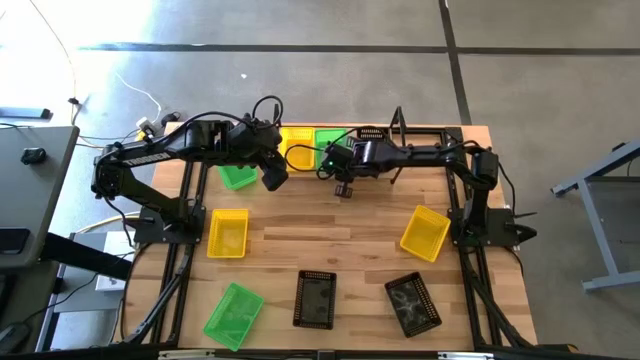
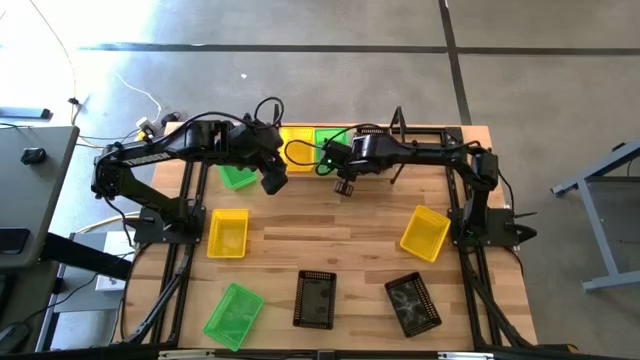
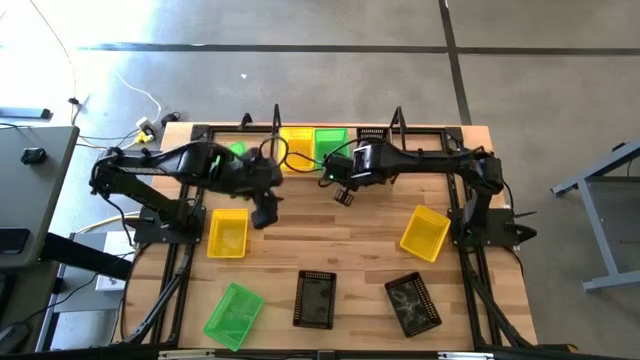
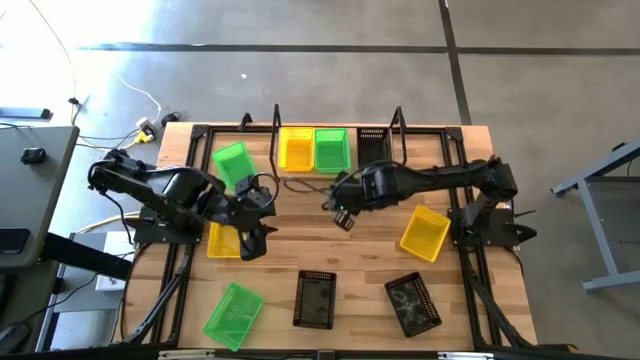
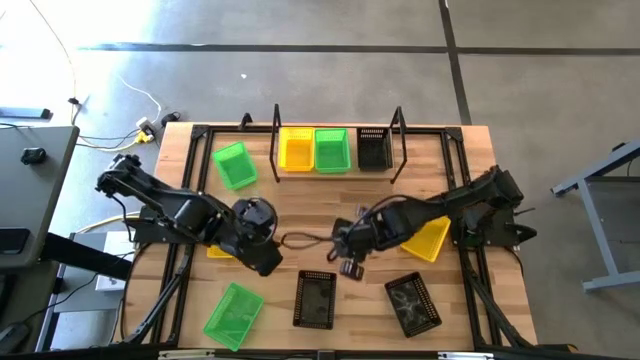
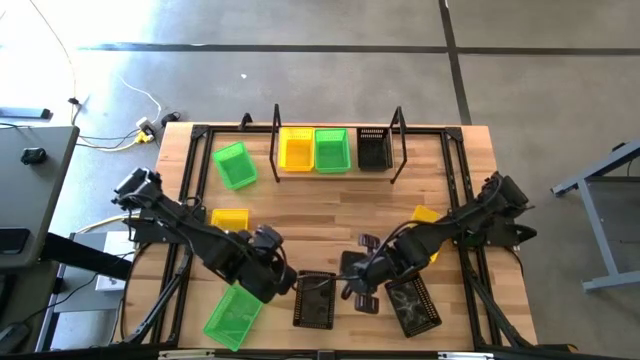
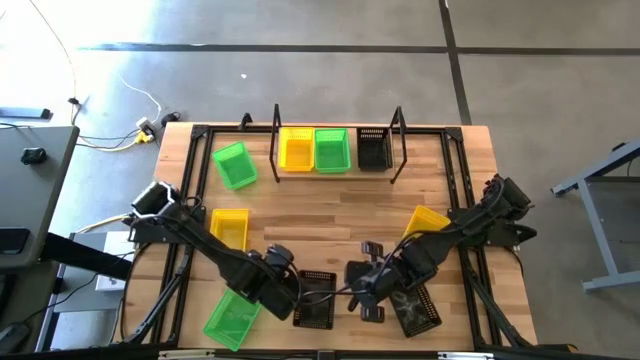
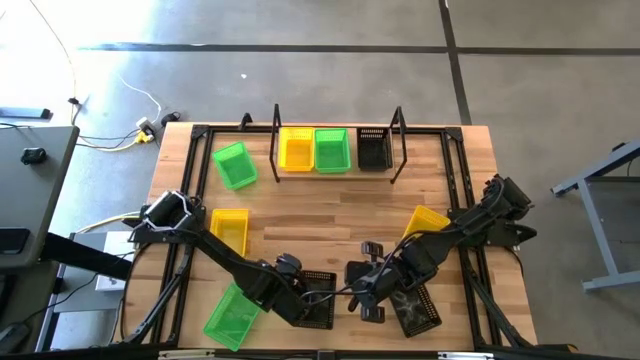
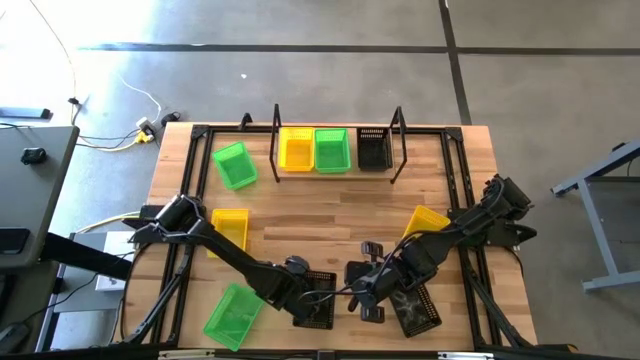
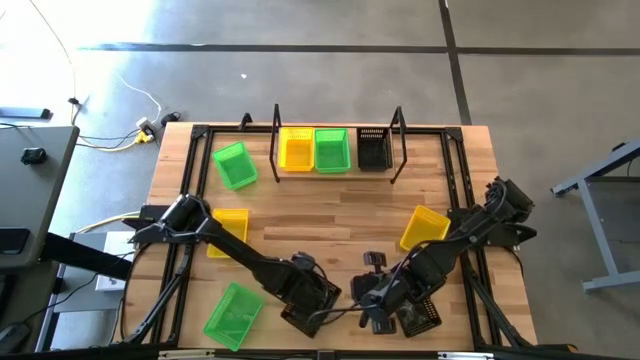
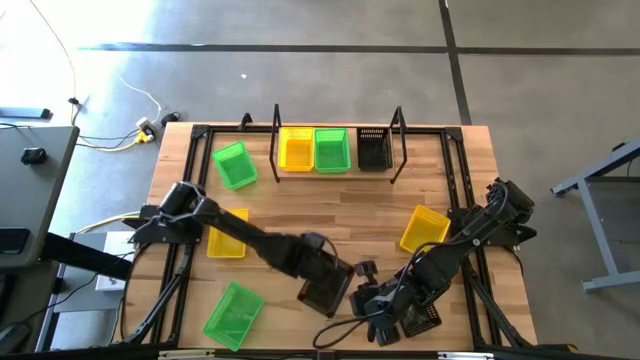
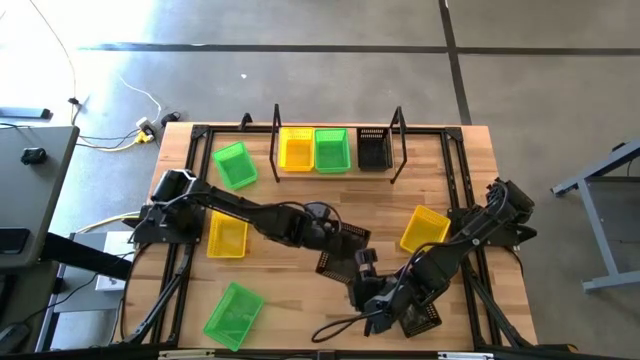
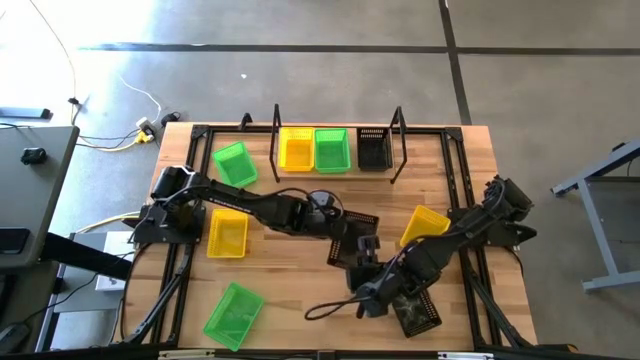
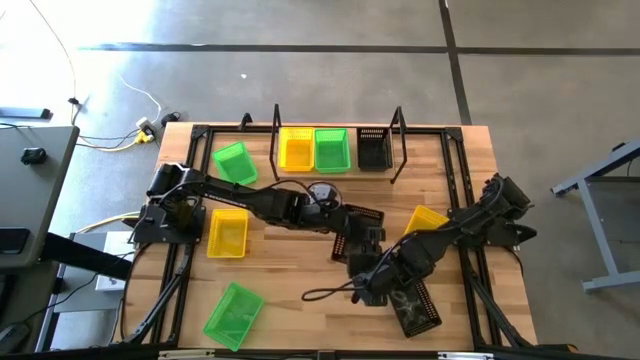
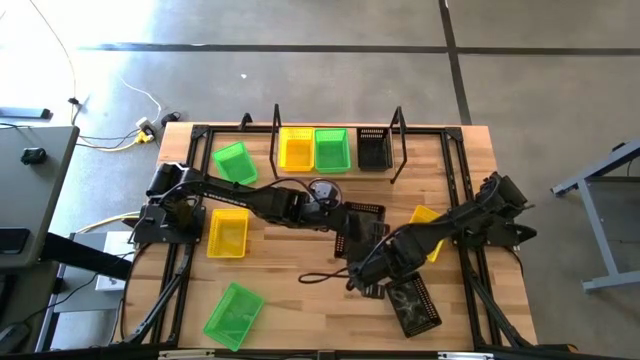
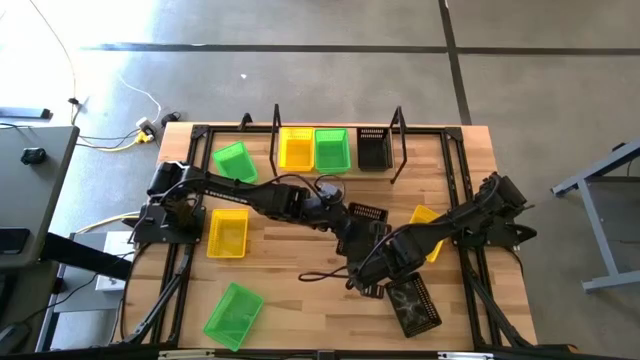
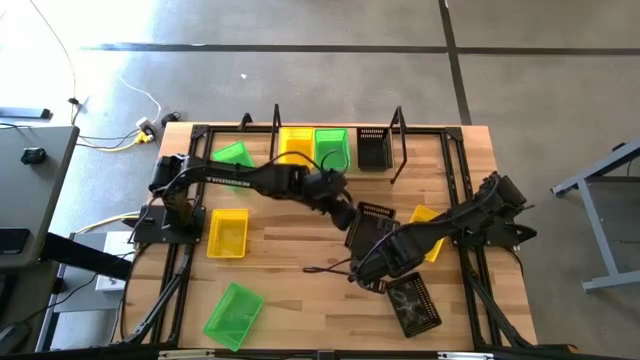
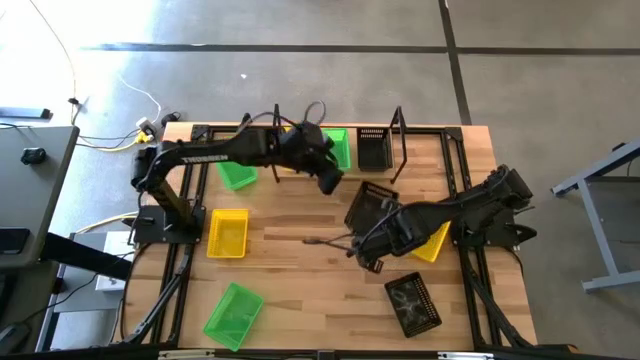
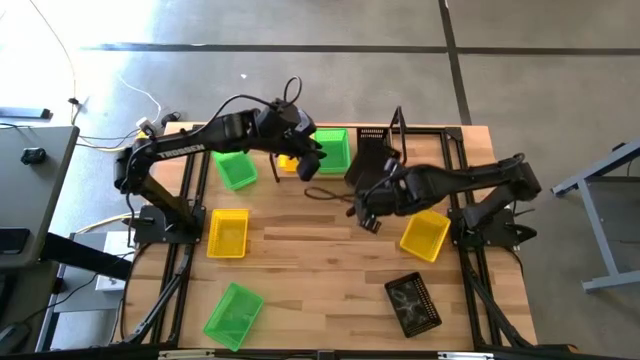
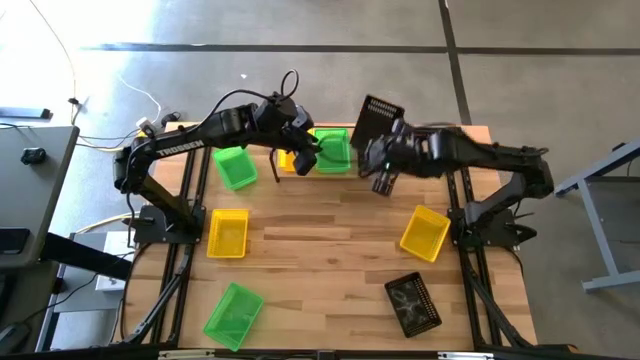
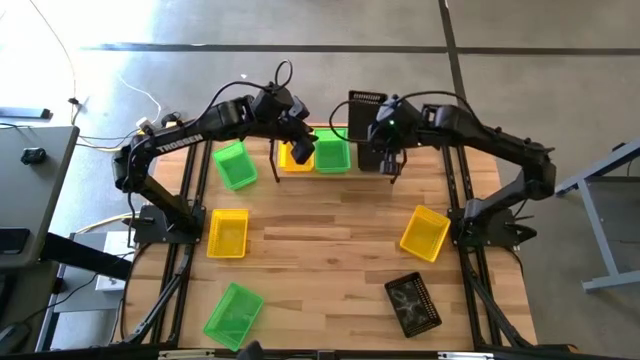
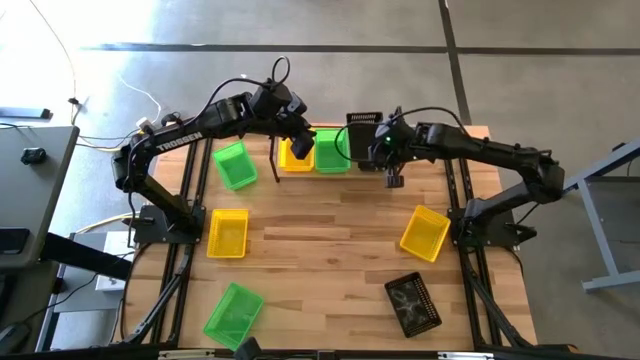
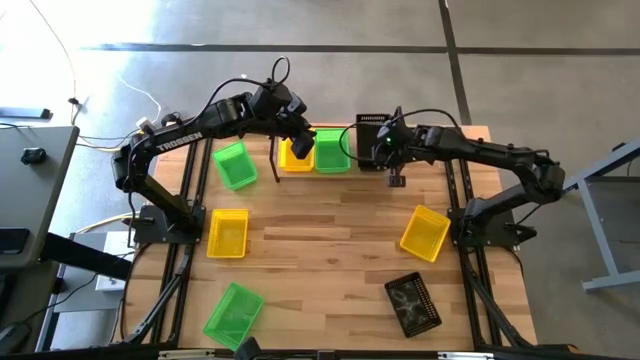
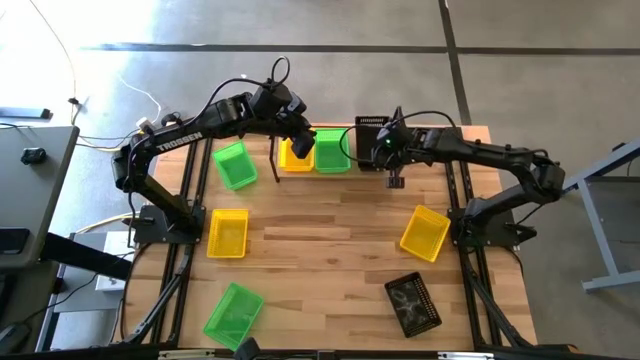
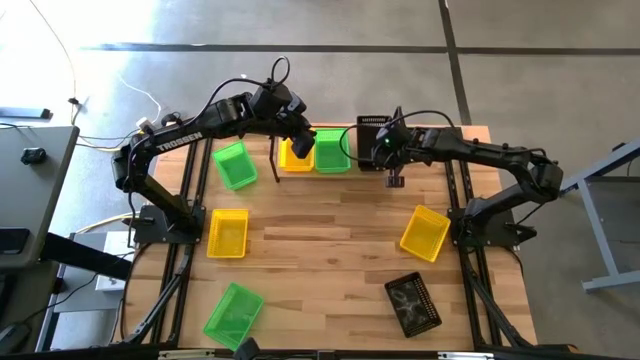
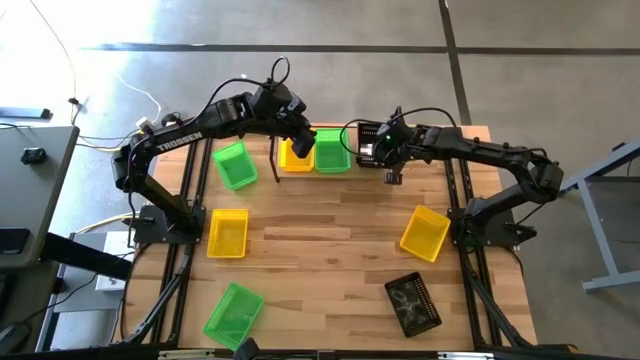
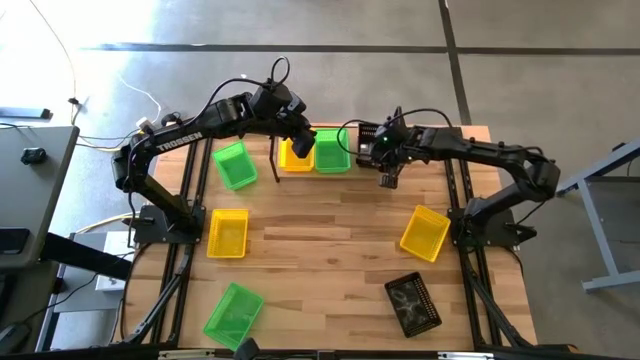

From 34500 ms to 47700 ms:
Task: Stack baskets on shelf by color
Stack the left black bin on the other black bin on the shelf

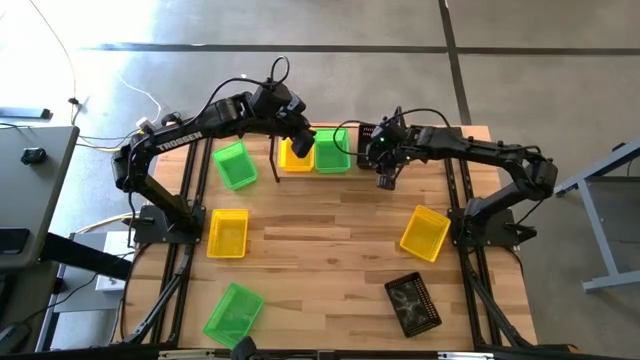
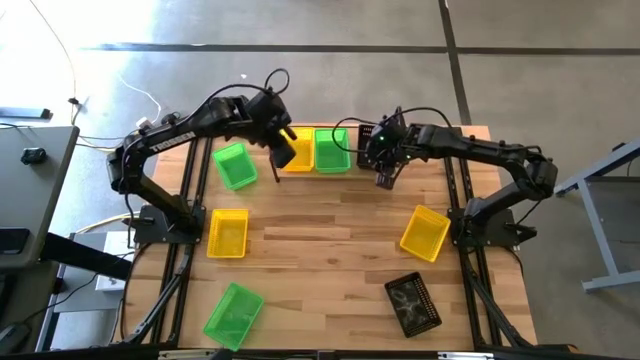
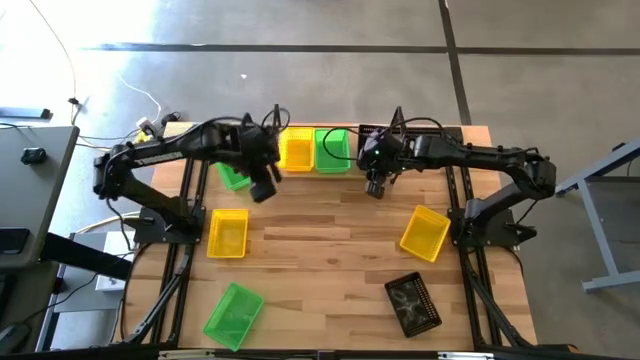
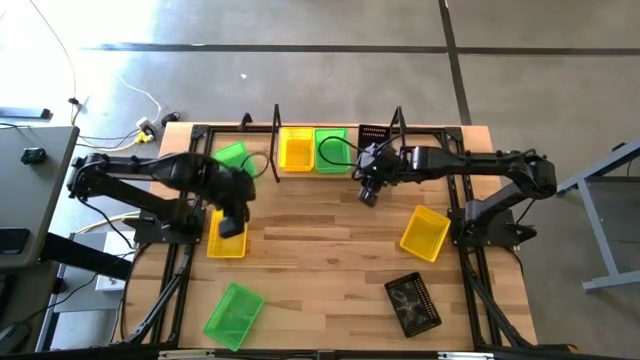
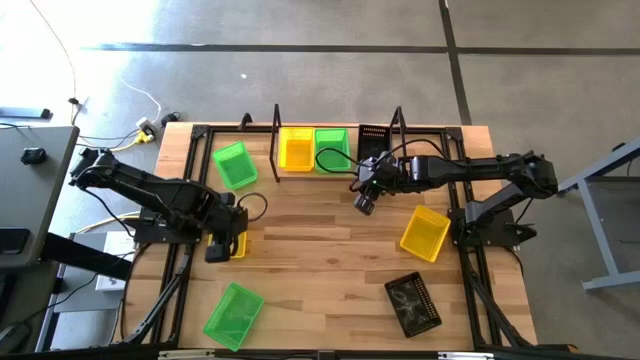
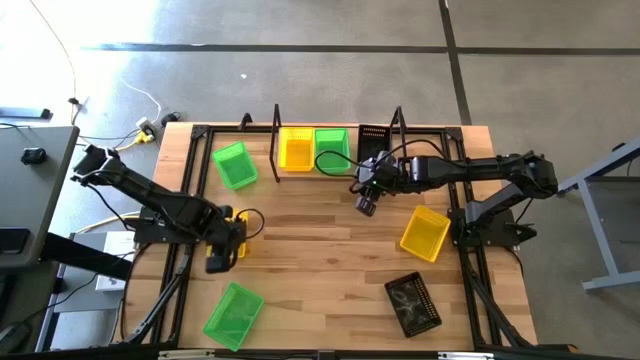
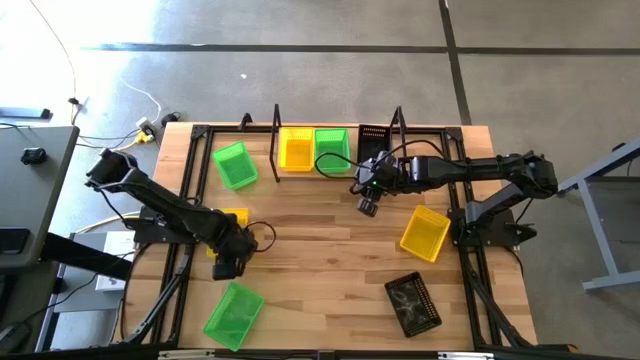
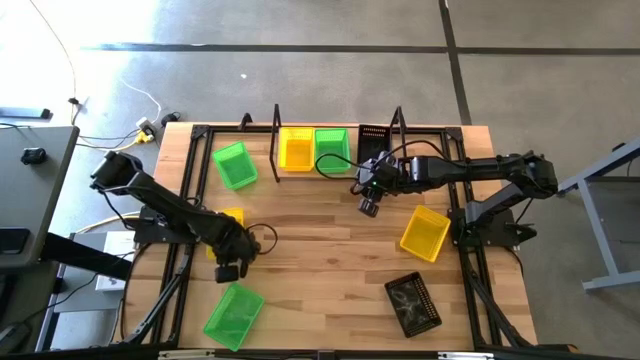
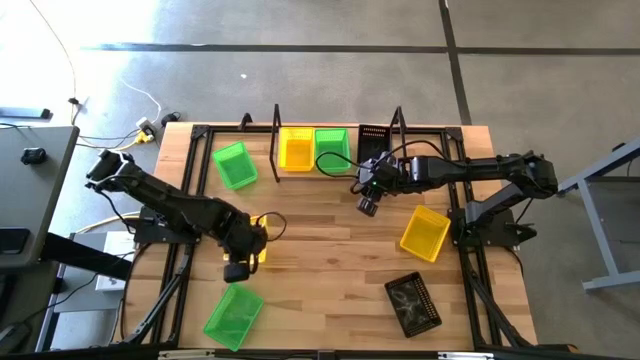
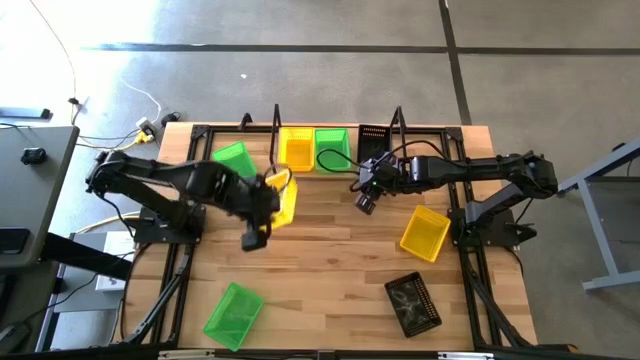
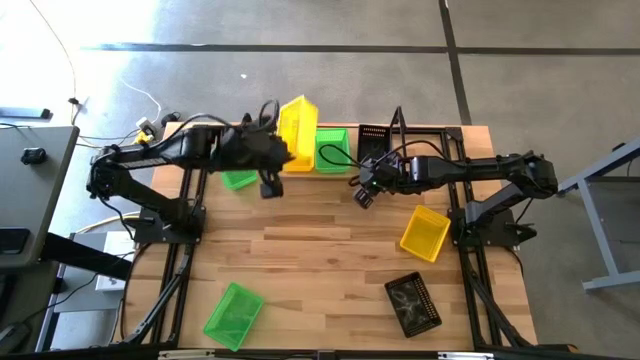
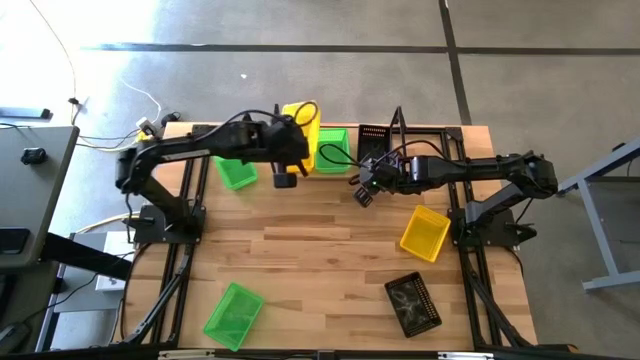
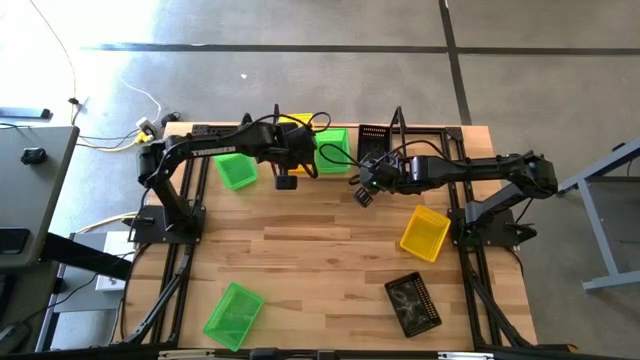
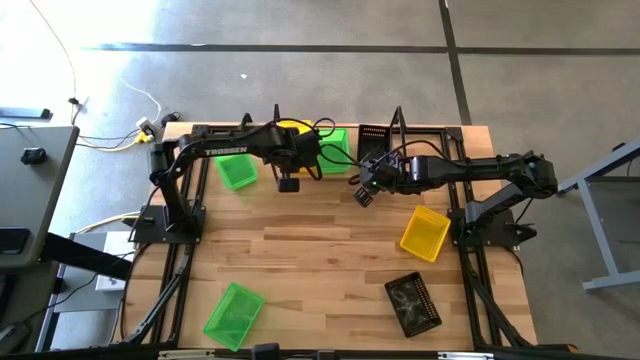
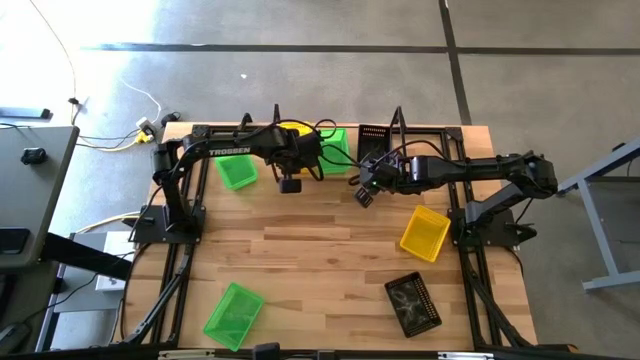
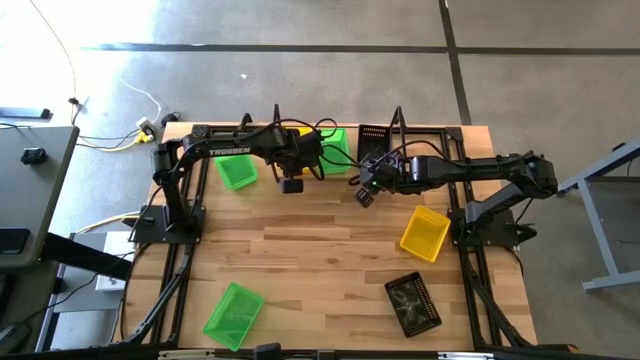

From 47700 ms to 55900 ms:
Stack the left yellow bin on the other yellow bin on the shelf
